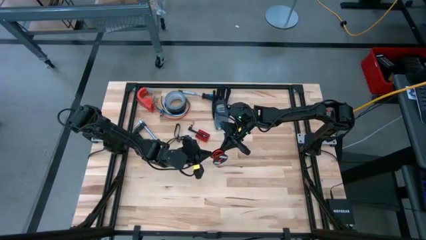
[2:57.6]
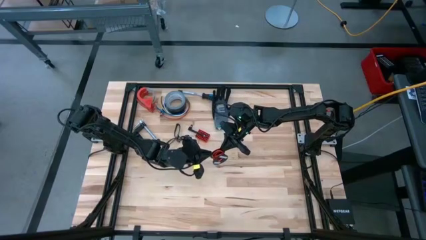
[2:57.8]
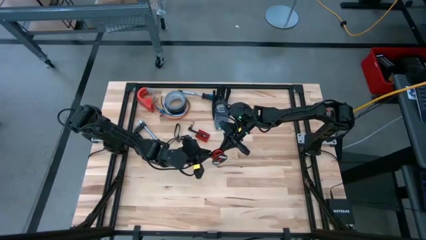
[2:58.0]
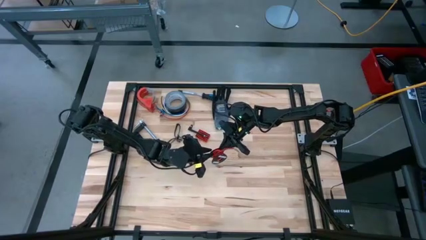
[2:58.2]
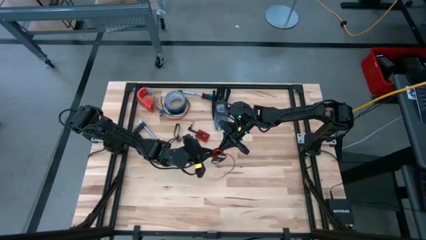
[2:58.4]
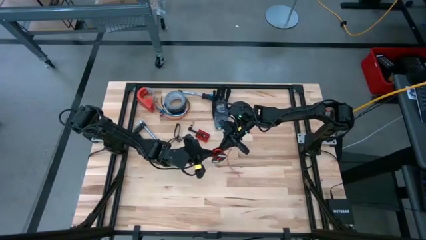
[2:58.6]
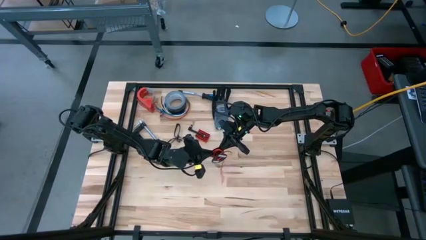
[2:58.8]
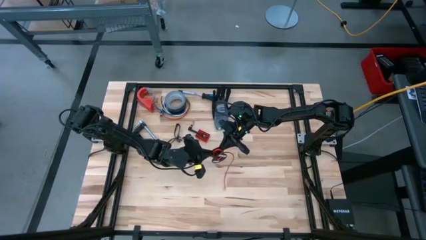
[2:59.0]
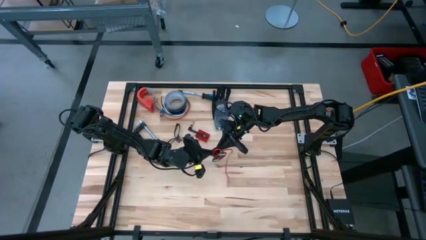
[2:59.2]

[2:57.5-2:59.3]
Task: Coil cords
Coil the orange wire into the black spool

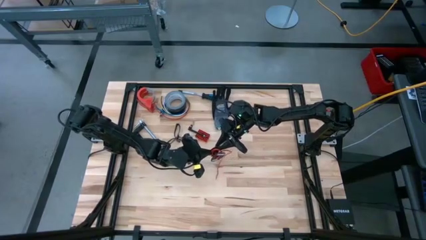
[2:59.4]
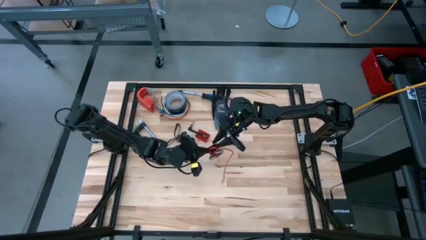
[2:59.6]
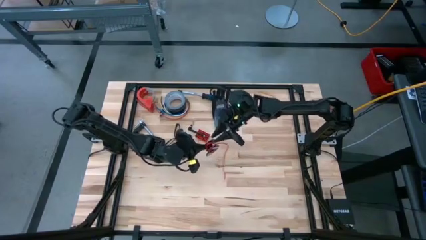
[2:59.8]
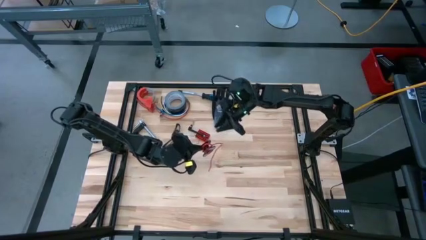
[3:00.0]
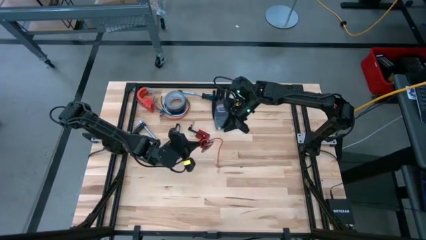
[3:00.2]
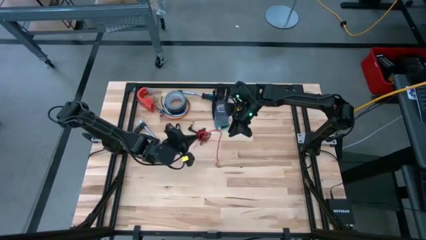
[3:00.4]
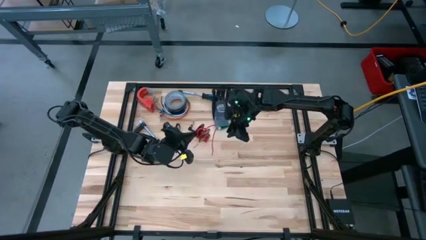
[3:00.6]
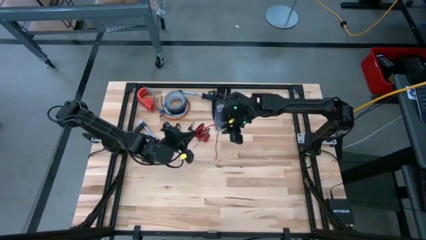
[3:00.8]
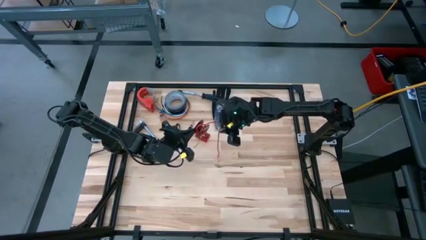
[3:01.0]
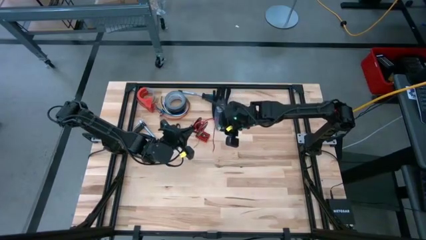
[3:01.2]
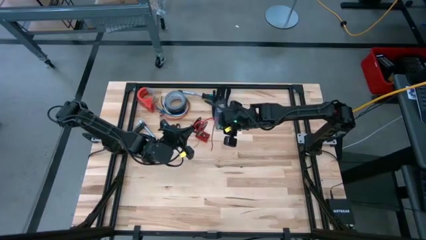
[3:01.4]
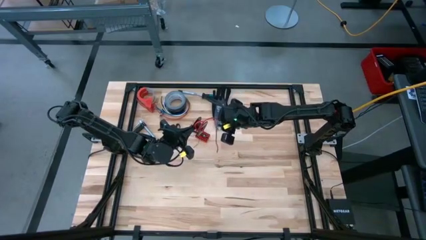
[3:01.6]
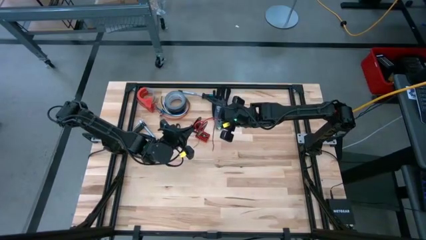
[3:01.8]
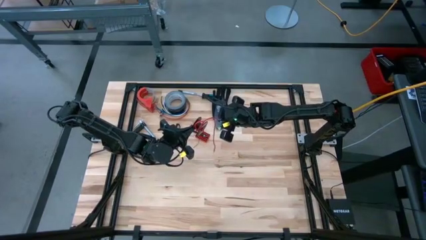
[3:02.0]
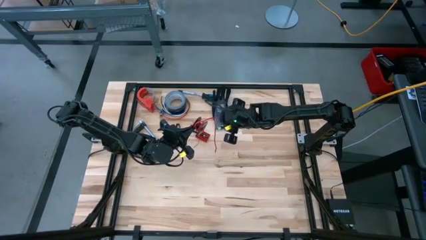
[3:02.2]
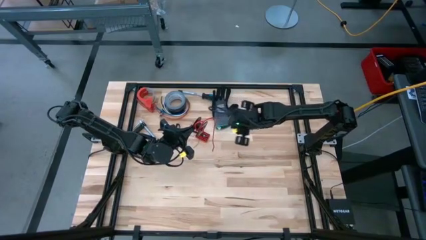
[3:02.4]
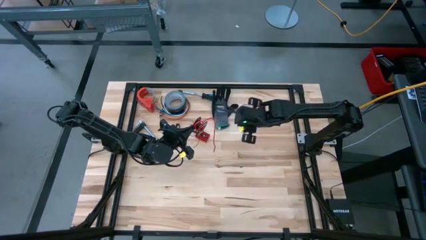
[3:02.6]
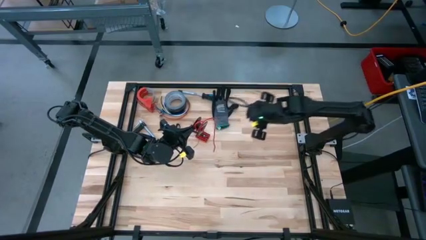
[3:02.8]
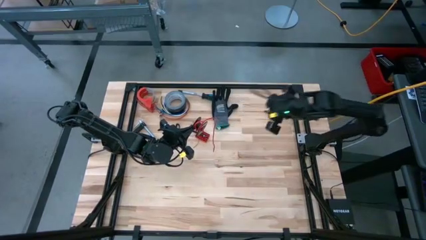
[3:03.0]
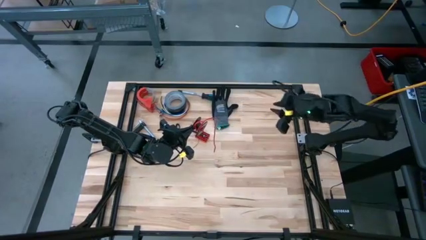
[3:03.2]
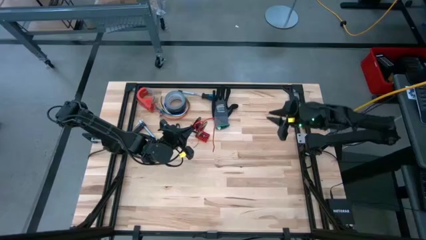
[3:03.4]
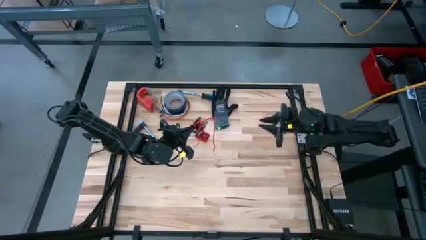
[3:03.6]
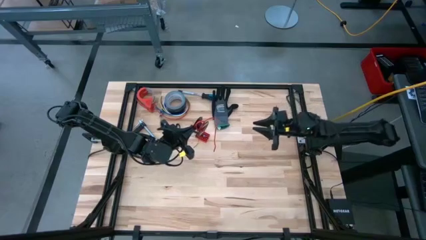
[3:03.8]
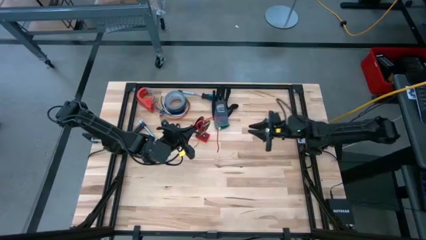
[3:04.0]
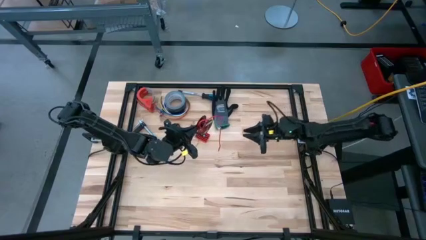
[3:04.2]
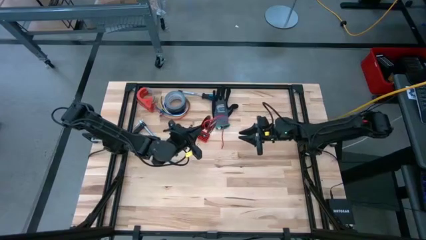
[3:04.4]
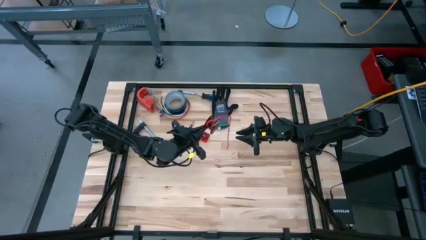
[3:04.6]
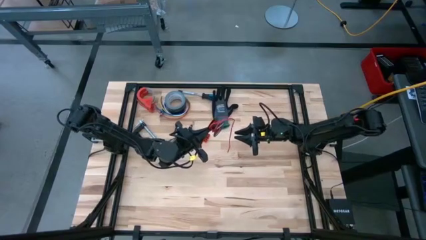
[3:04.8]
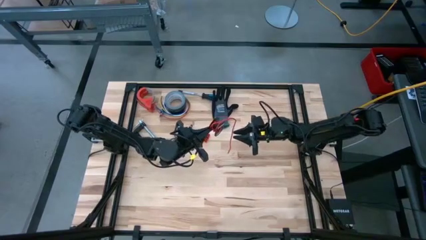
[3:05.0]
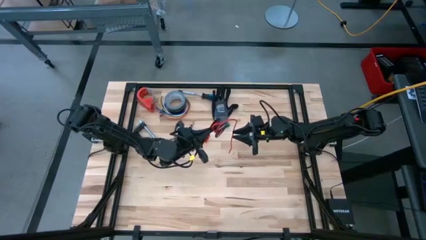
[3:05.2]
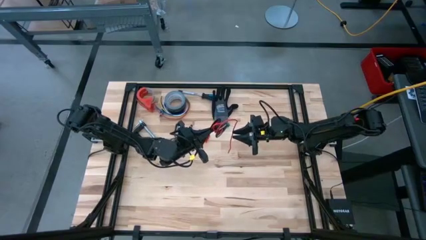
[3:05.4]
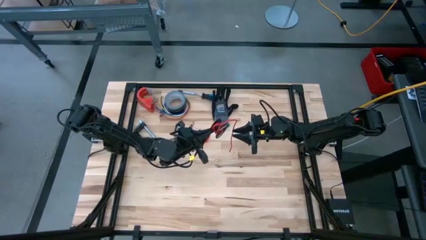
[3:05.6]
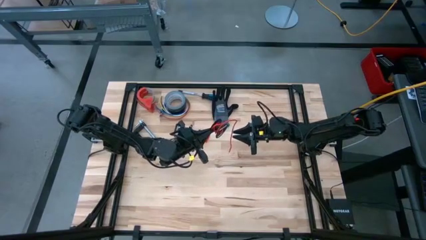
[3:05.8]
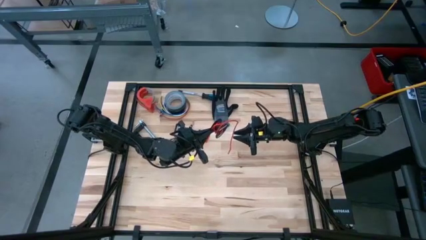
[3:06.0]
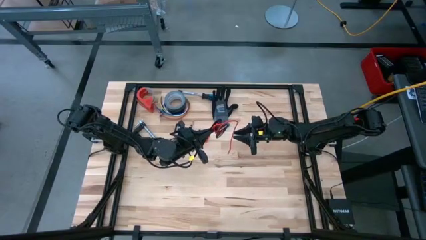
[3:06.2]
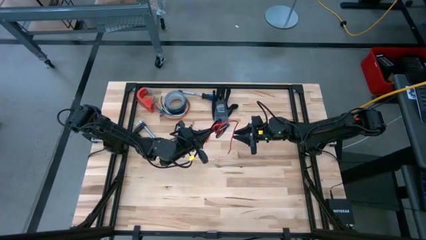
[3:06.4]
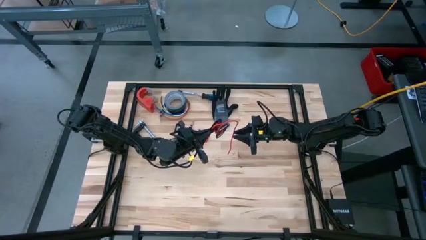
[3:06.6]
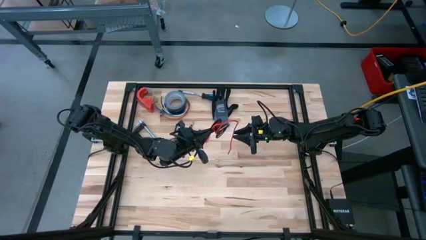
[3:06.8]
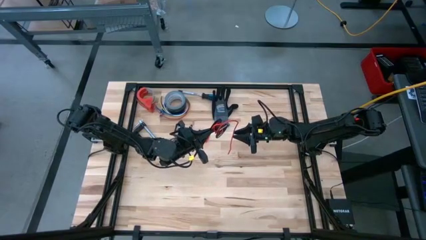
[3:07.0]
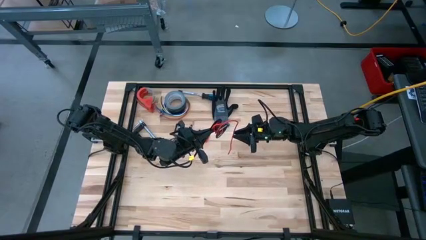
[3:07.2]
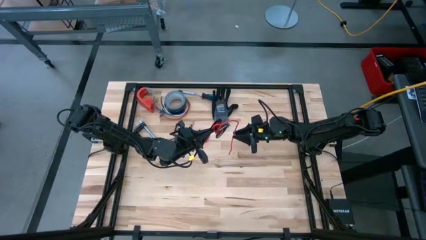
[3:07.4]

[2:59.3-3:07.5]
Coil the orange wire into the black spool

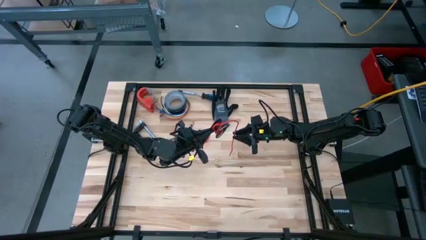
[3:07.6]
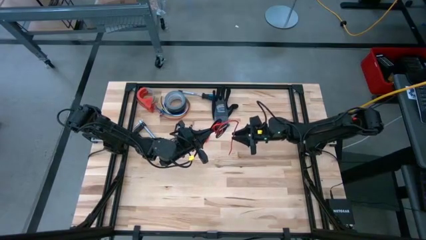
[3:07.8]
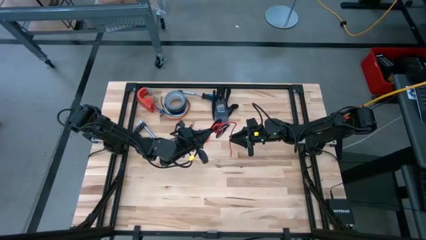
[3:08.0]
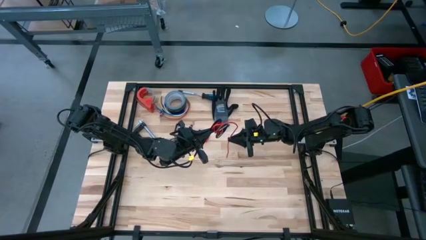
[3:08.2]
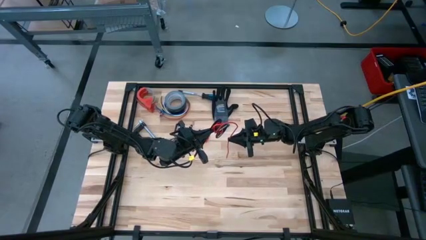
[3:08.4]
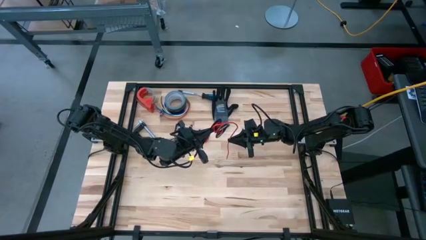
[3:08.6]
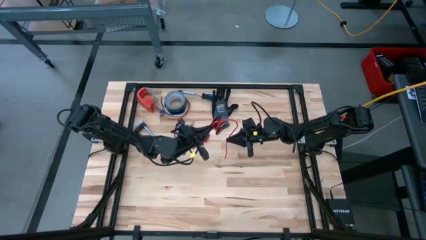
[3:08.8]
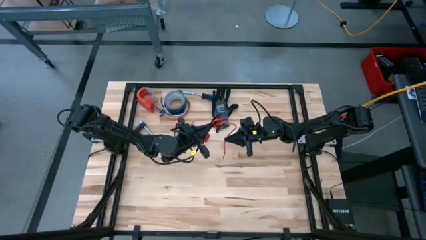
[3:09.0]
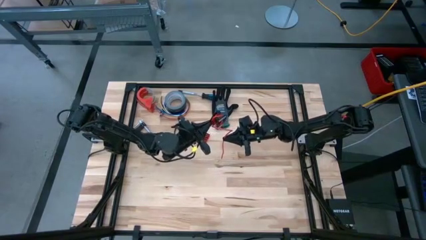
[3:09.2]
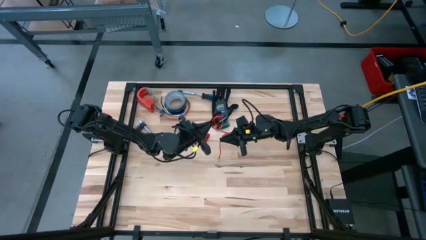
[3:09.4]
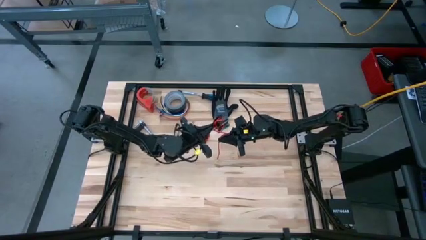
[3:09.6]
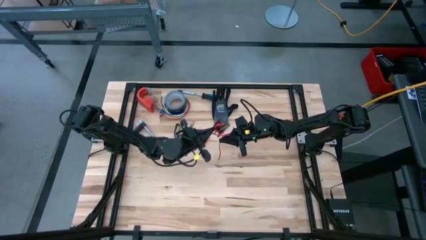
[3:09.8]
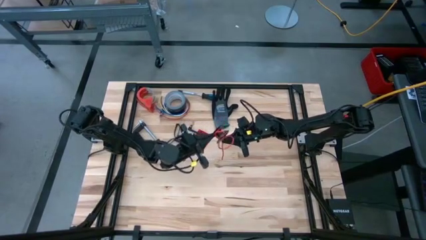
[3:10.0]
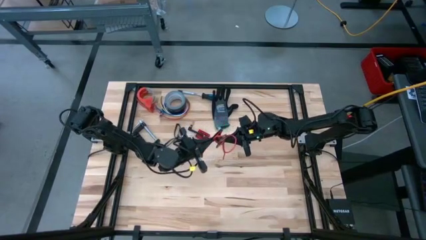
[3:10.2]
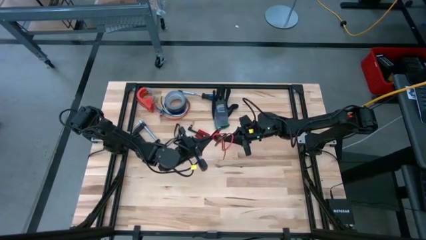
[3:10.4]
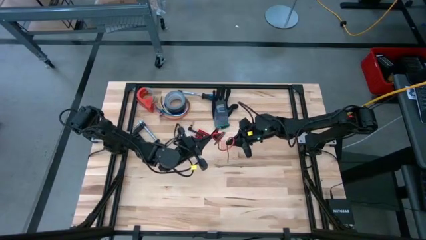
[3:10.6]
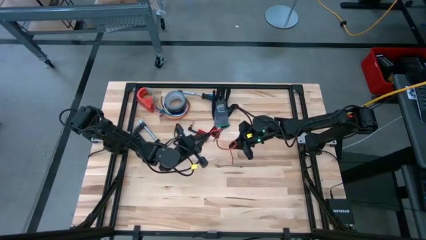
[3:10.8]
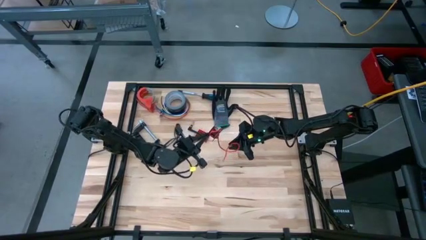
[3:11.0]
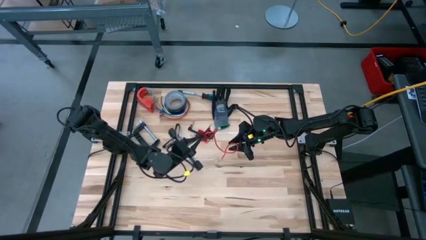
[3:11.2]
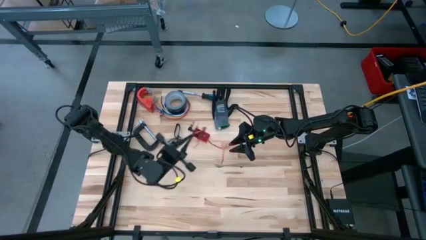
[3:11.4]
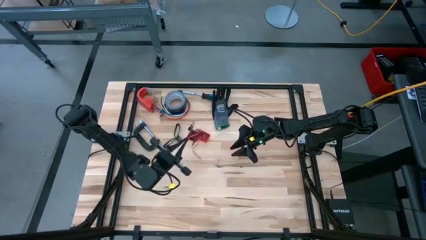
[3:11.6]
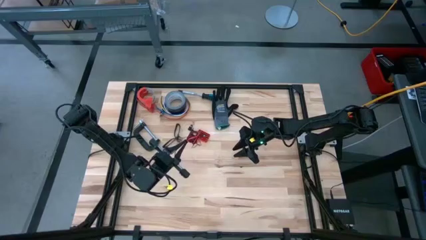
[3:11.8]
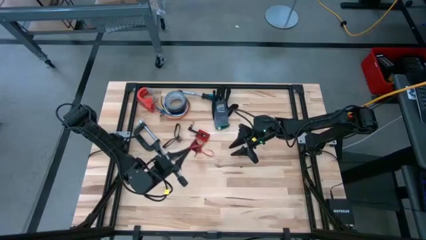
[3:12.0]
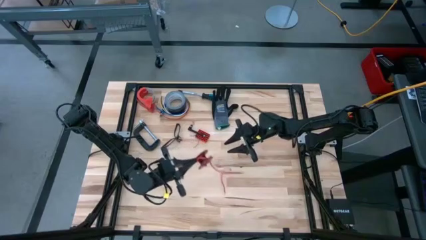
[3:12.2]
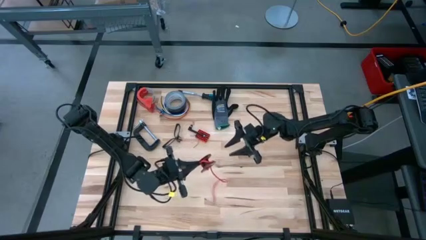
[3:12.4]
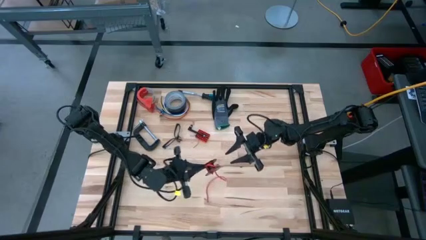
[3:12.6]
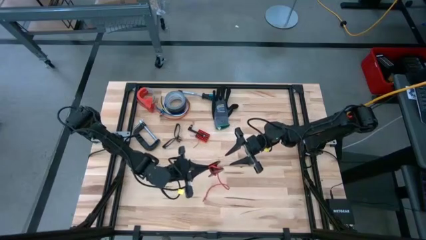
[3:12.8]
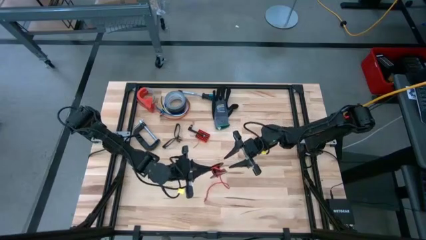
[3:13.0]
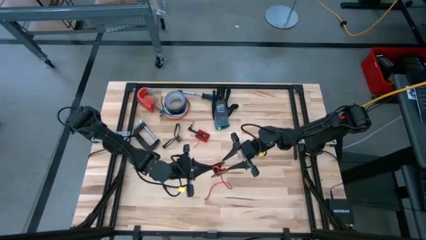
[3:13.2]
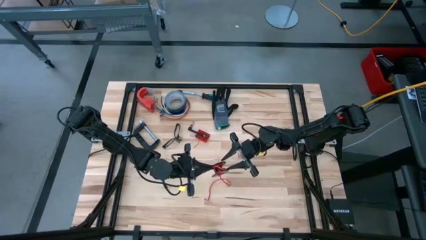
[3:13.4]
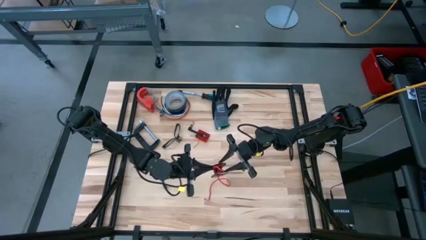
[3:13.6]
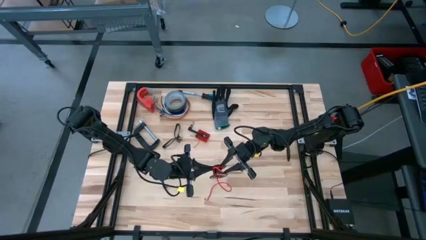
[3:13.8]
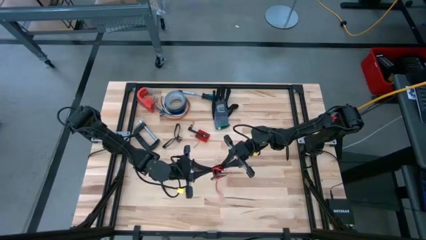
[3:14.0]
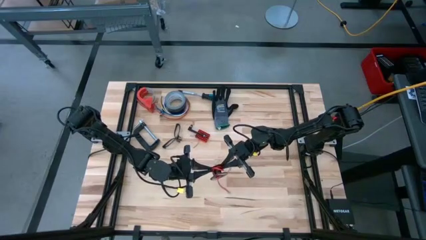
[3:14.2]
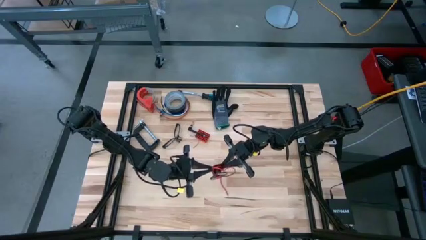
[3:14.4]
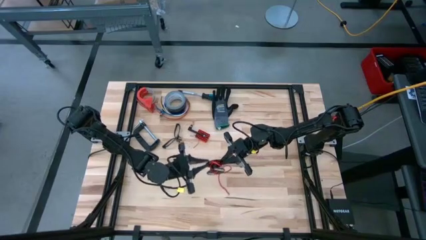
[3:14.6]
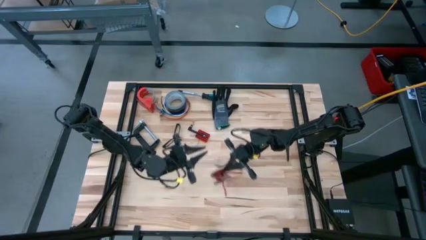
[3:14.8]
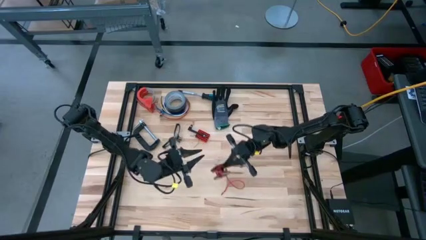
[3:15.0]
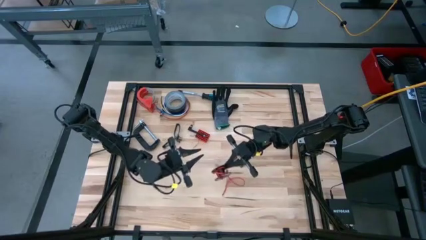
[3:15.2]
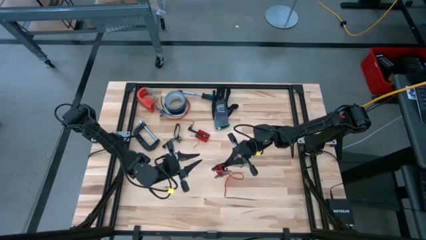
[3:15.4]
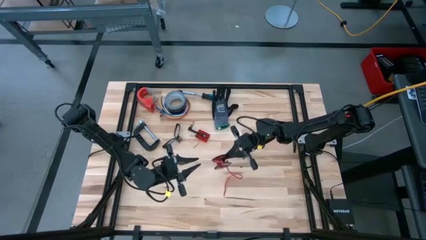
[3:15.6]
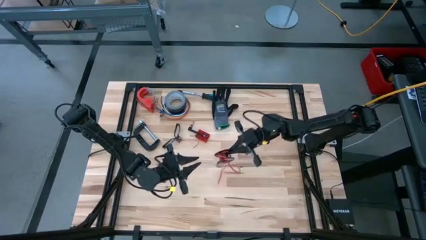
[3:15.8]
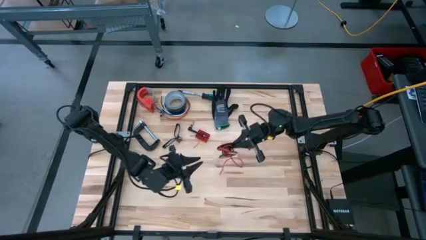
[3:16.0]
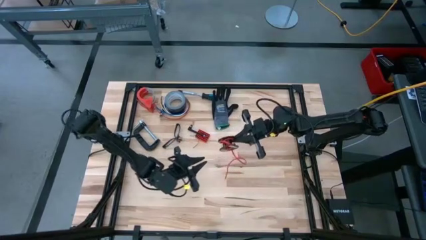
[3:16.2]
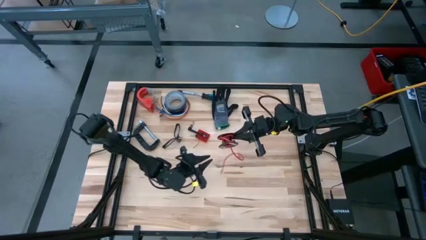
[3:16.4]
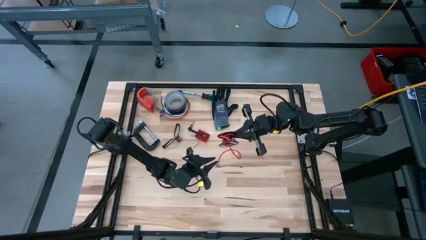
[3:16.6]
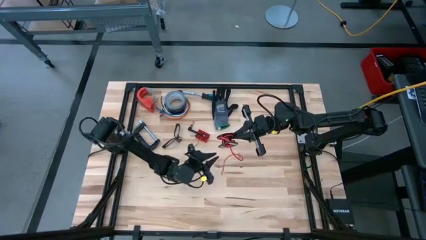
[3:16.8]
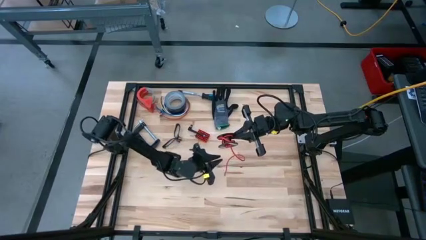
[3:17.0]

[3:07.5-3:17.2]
Coil the orange wire into the black spool
